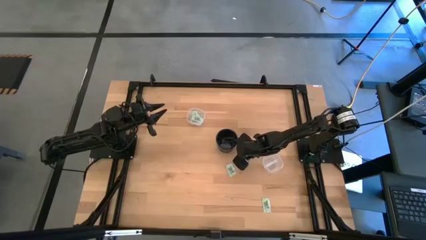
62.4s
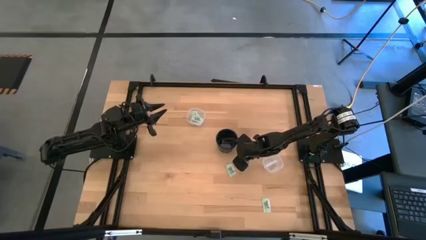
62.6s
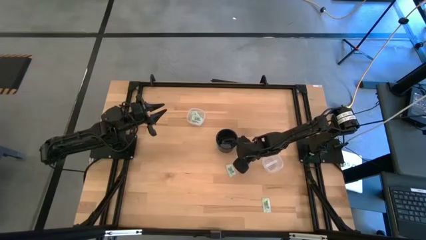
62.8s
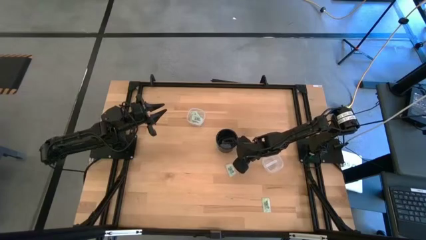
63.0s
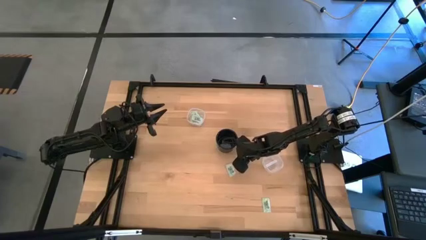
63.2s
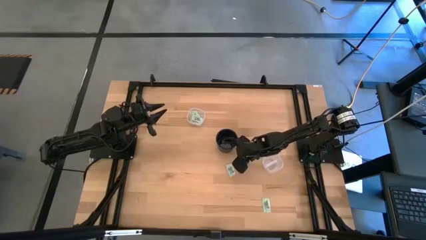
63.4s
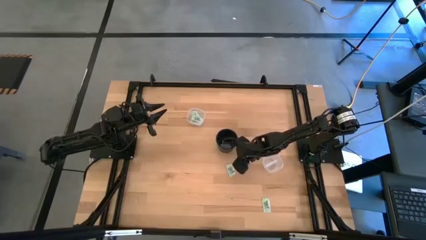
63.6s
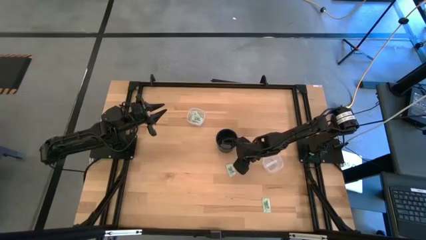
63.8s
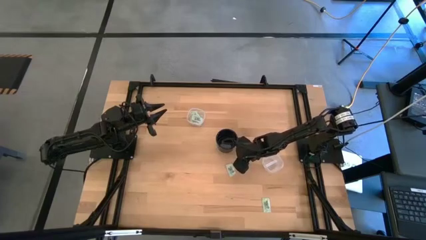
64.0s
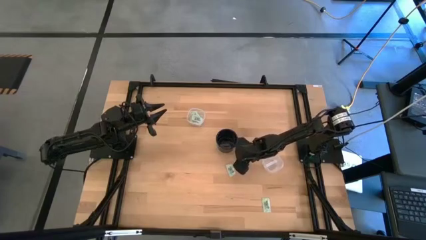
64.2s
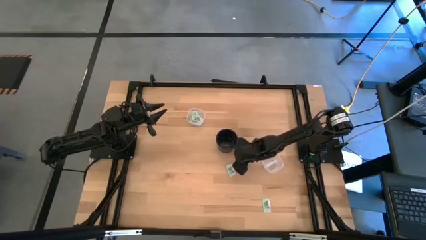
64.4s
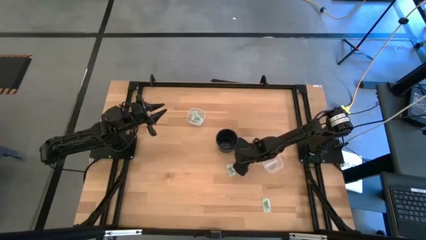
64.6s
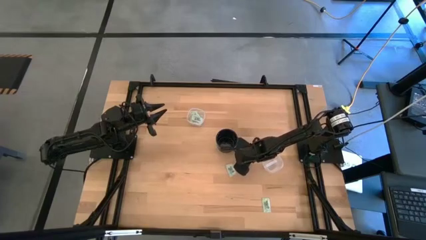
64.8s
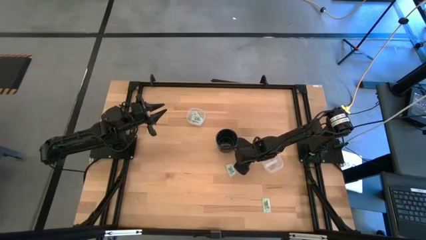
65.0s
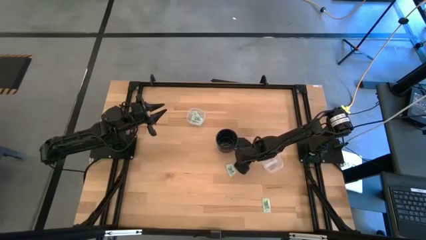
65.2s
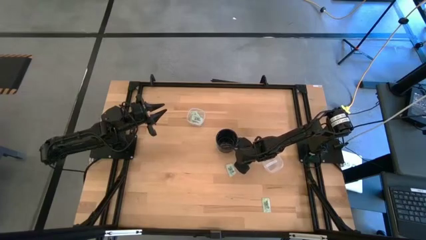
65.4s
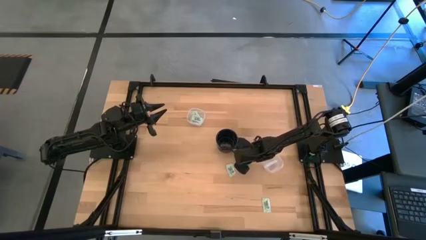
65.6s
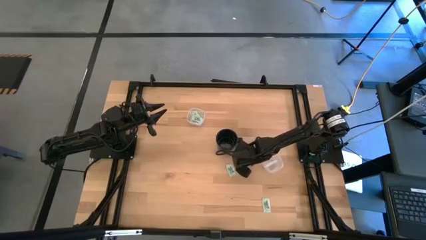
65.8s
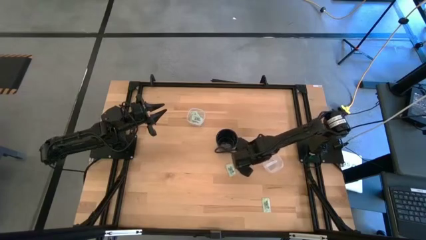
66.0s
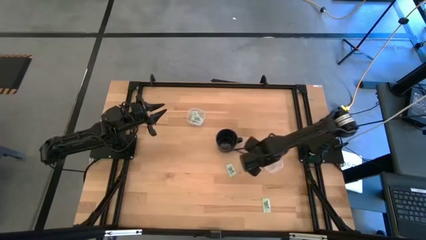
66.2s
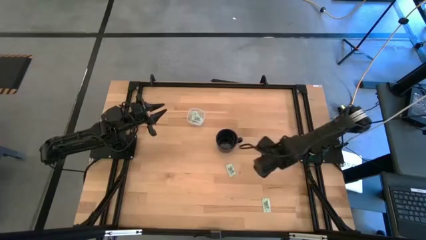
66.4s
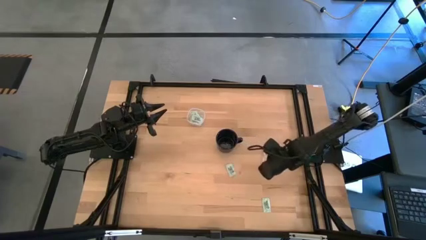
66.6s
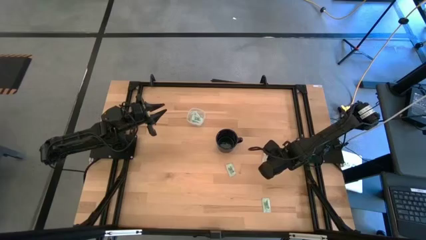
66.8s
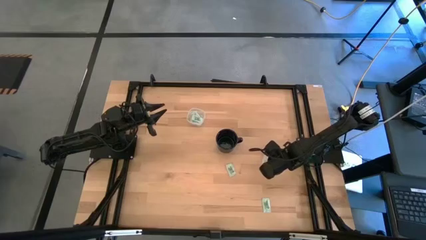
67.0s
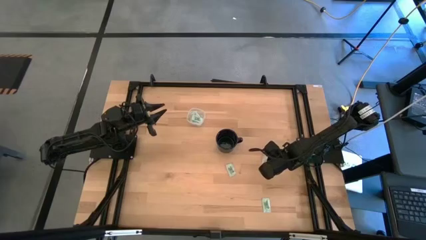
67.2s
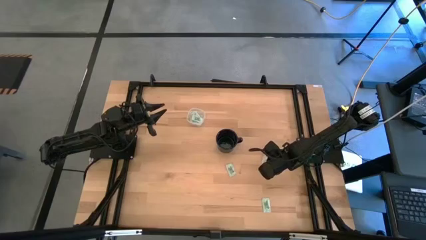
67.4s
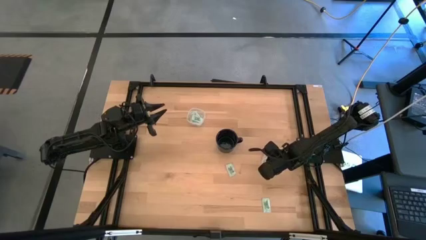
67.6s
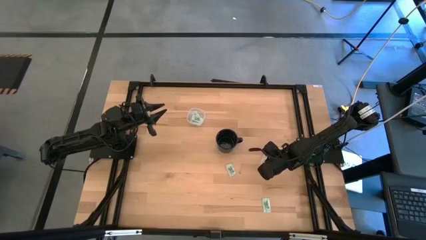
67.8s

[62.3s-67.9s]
Task: Pick and place items into bin
Put the top green stevia packet into the bottom transparent bin

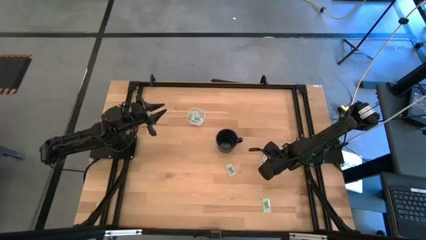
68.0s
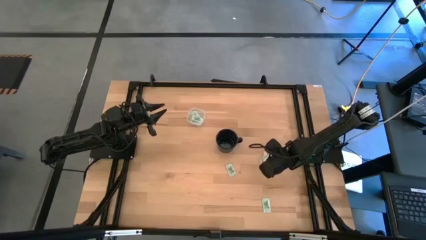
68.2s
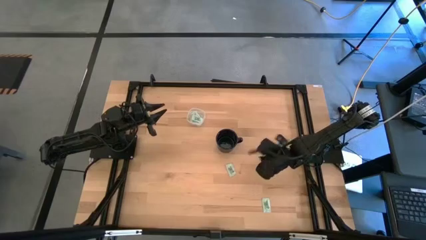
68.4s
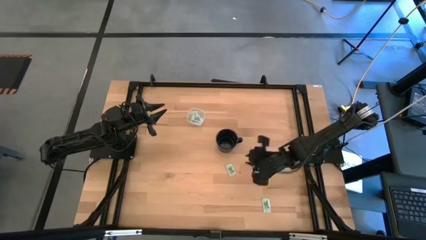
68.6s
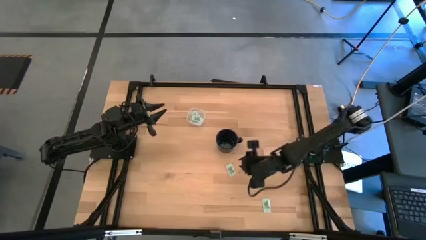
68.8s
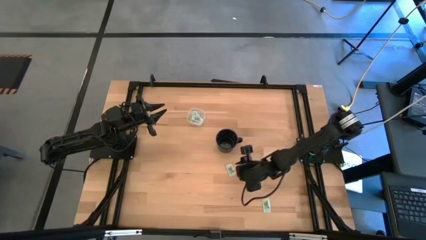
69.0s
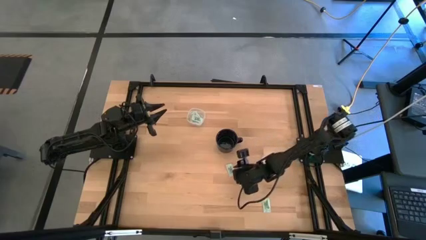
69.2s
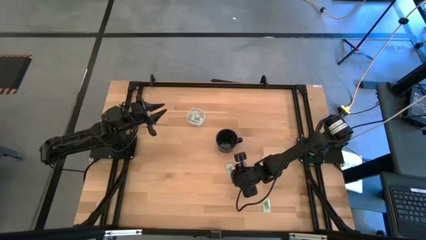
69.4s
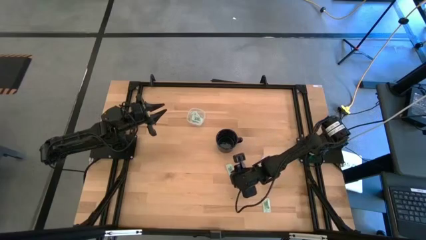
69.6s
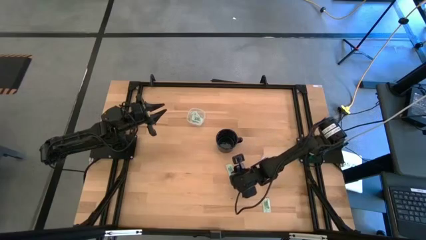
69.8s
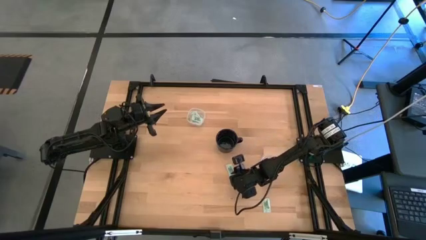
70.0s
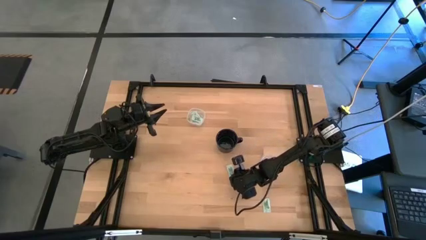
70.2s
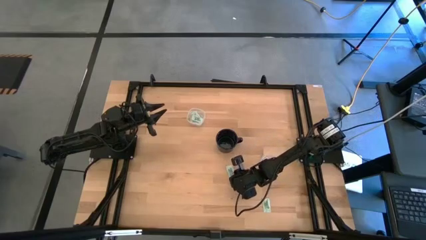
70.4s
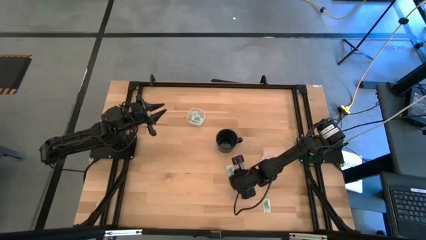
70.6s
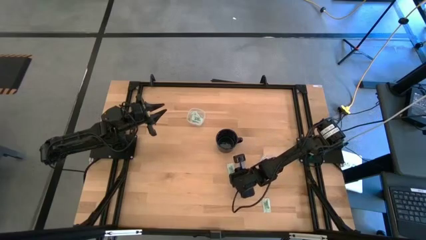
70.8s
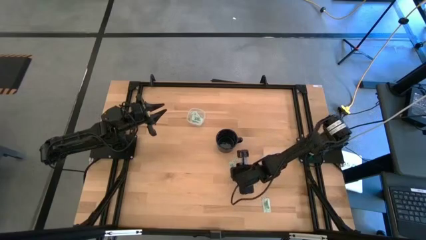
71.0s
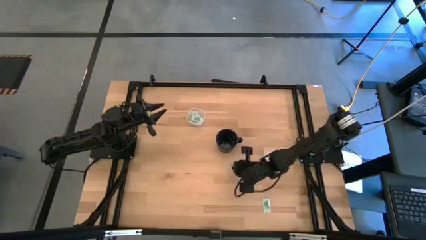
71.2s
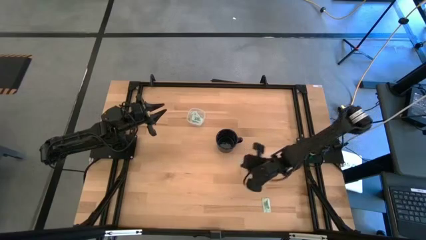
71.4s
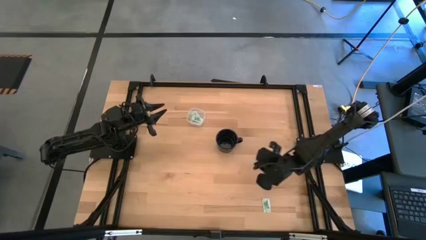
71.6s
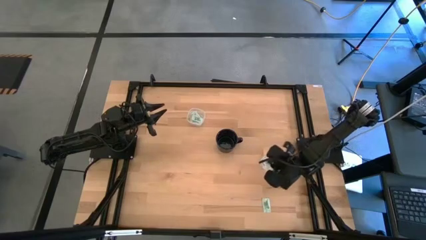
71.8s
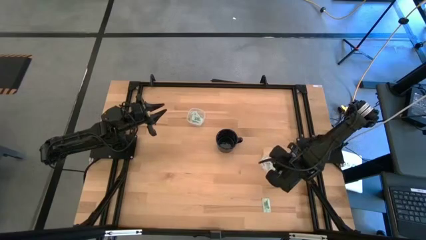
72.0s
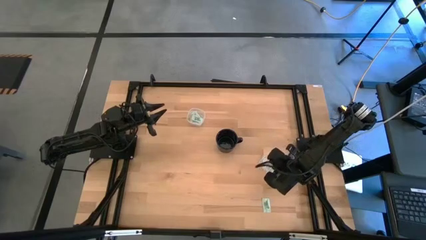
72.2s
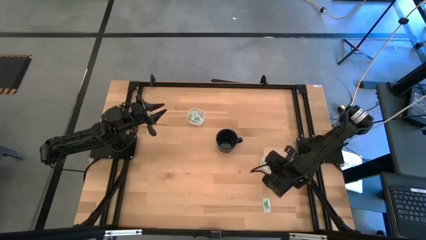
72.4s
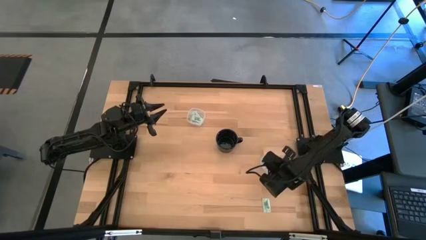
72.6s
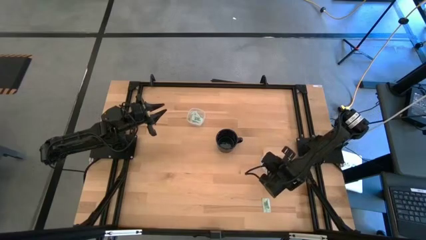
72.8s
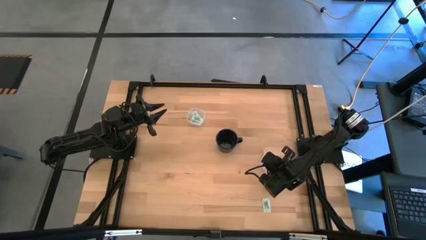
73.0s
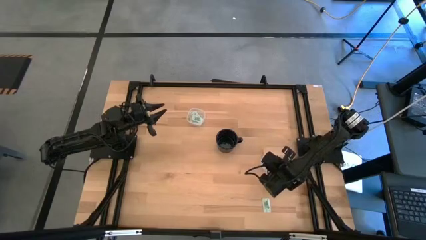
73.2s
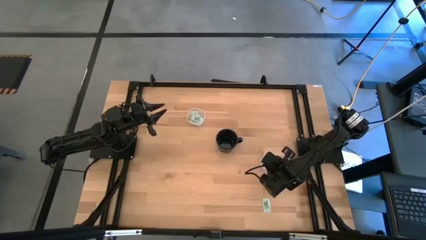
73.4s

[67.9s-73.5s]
Put the top green stevia packet into the bottom transparent bin

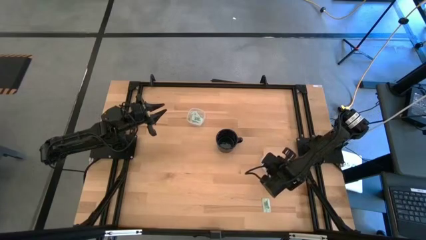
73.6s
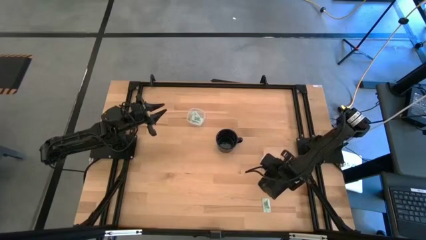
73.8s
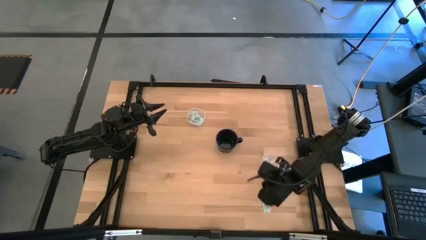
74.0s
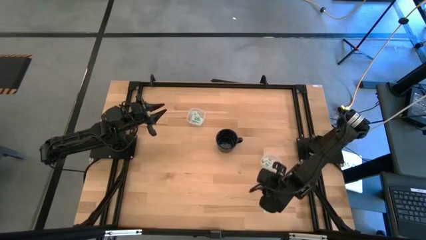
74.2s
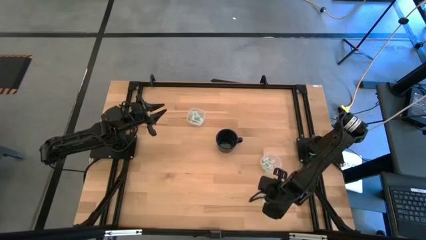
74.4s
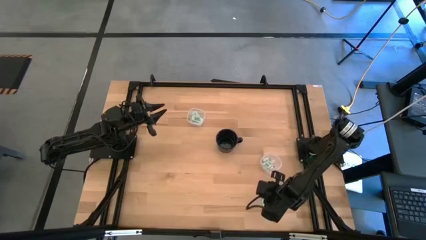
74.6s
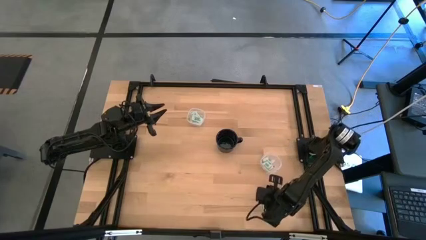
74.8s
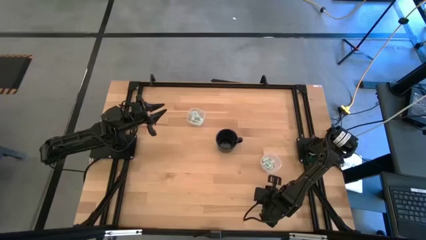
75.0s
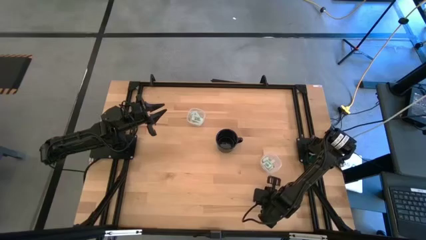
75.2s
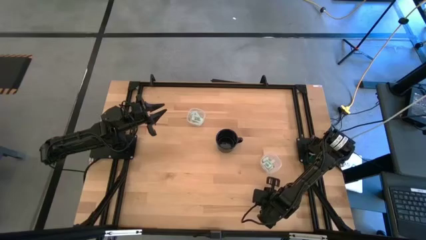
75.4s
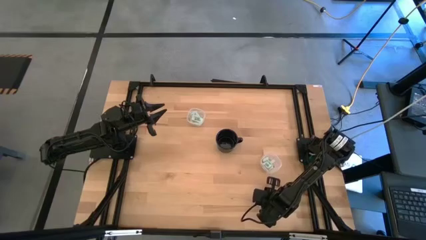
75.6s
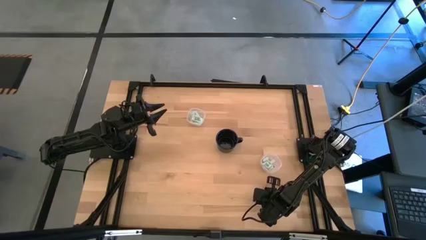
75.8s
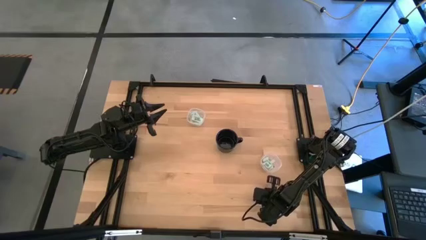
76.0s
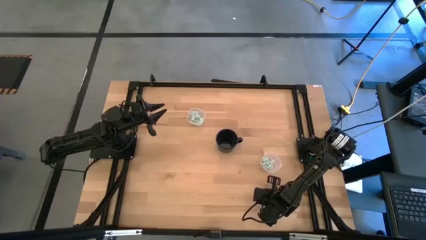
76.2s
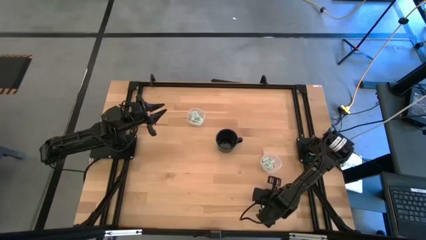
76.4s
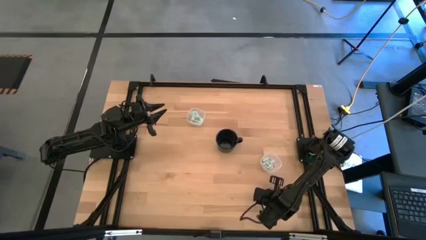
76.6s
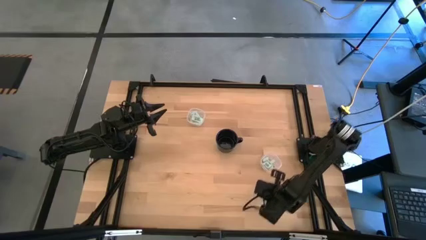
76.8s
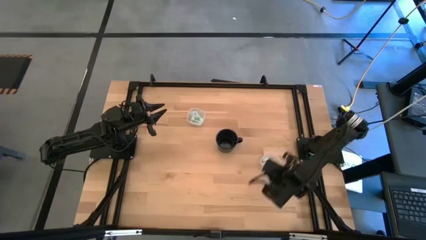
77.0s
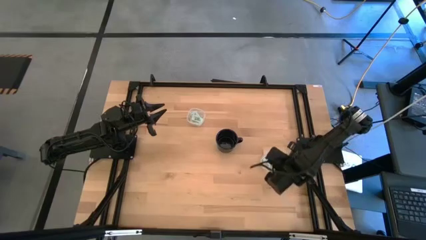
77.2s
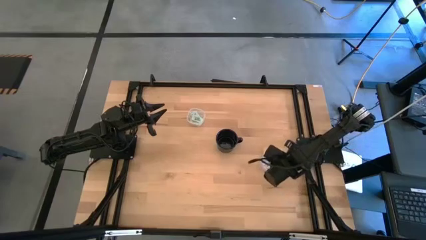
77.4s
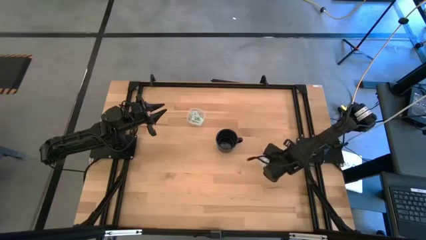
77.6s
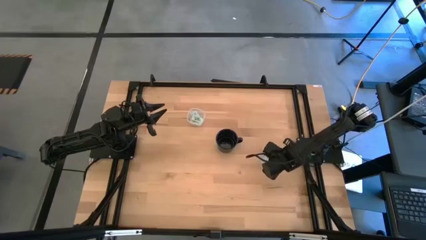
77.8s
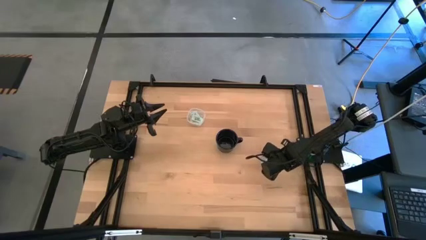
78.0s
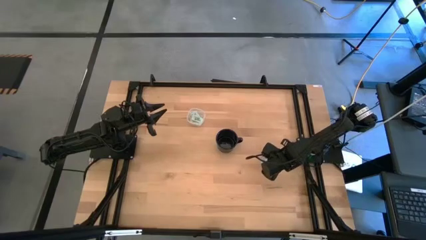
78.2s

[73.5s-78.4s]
Put the green stevia packet into the bottom transparent bin

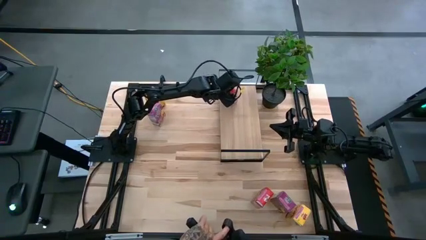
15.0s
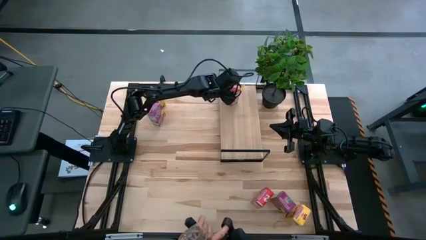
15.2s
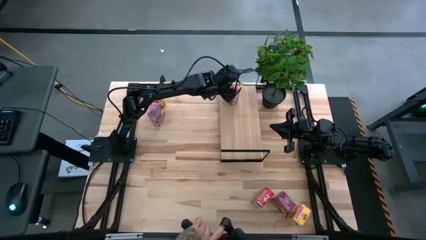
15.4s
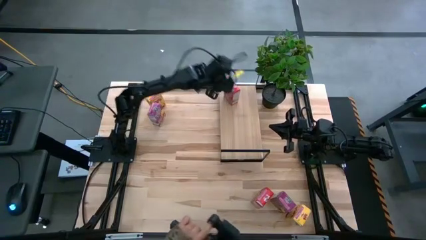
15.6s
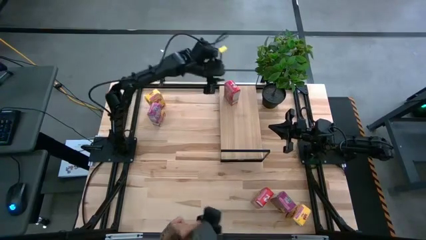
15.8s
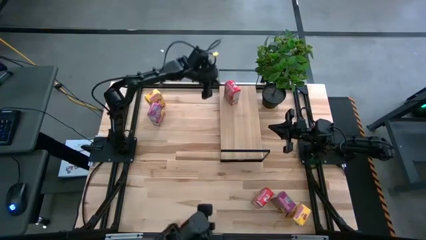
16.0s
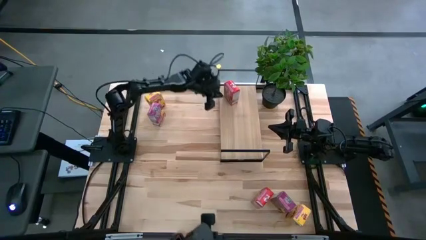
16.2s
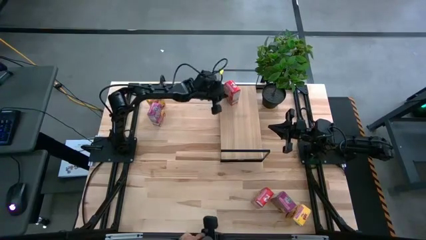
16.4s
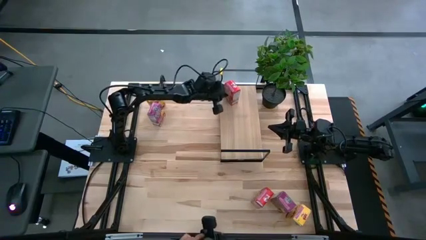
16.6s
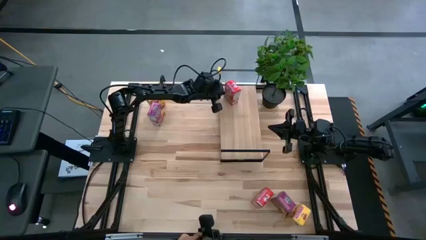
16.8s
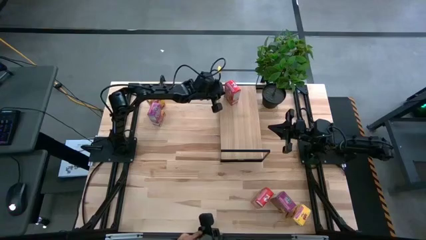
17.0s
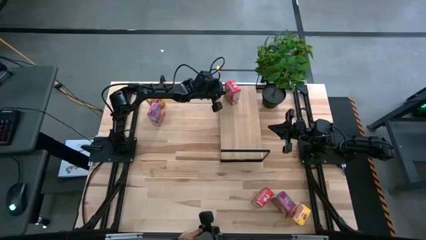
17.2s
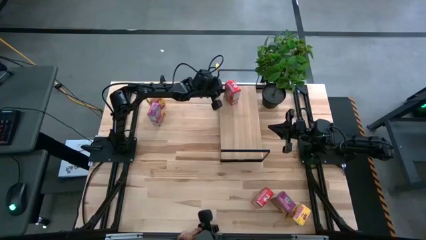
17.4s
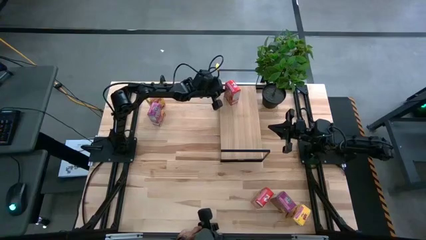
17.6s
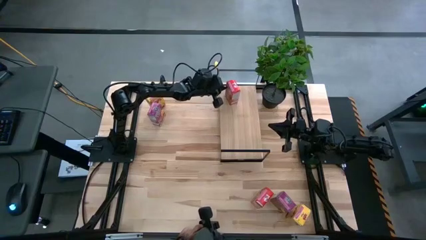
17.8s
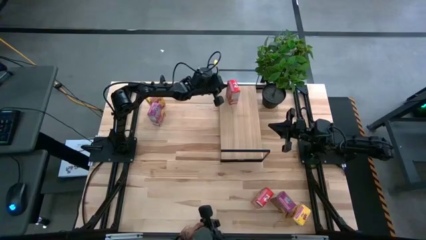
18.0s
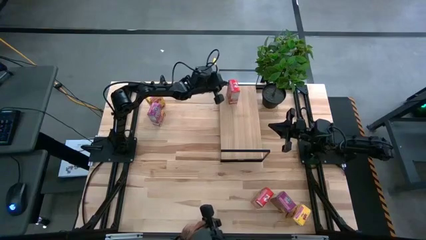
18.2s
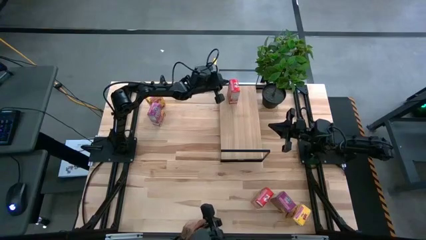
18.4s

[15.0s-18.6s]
Task: Stack cereal on shelf
Adjust the red cereal box on the shelf
